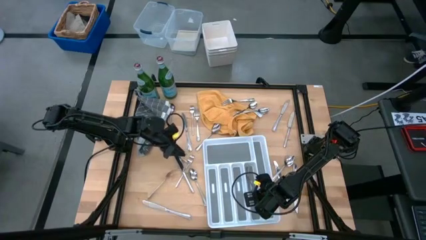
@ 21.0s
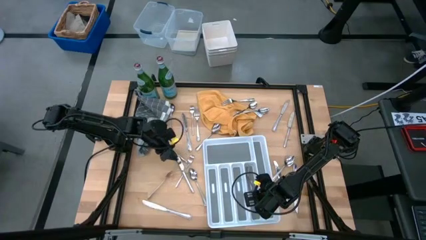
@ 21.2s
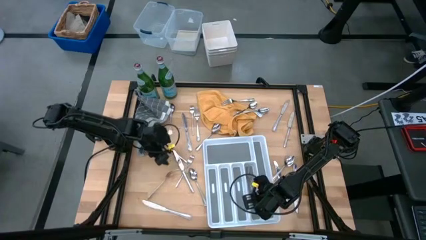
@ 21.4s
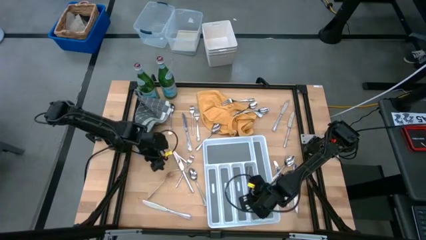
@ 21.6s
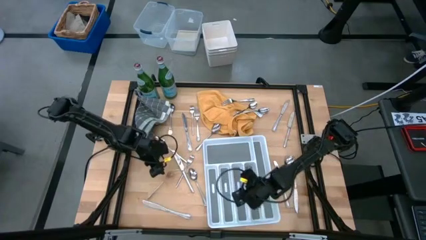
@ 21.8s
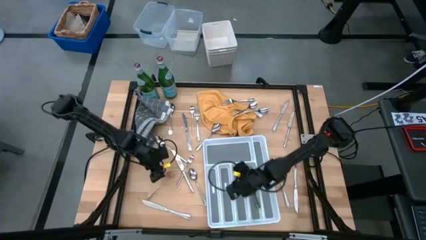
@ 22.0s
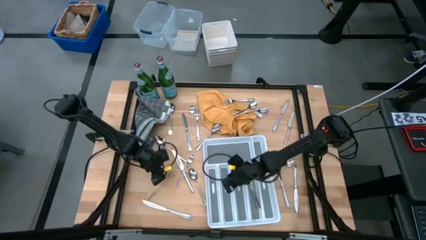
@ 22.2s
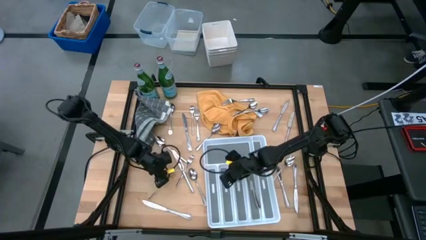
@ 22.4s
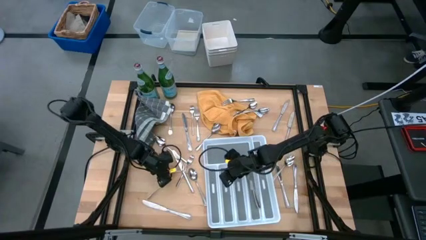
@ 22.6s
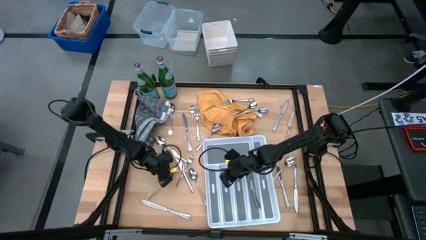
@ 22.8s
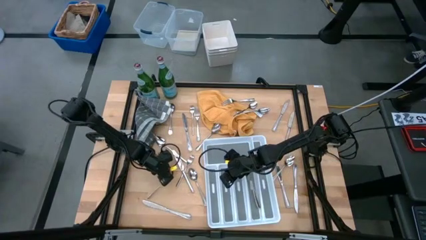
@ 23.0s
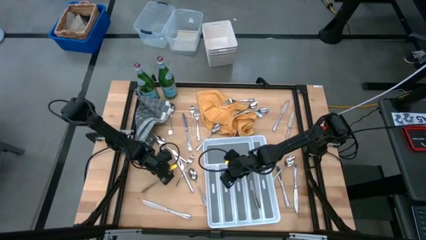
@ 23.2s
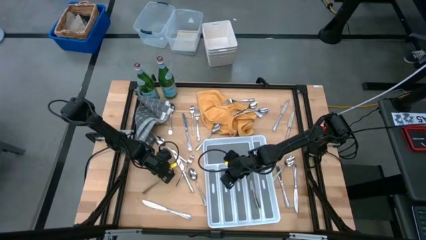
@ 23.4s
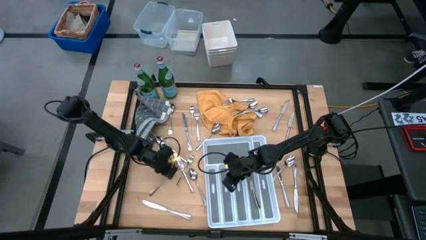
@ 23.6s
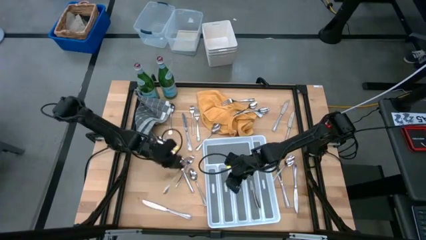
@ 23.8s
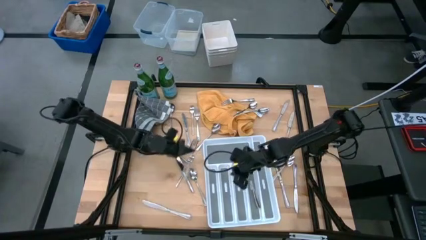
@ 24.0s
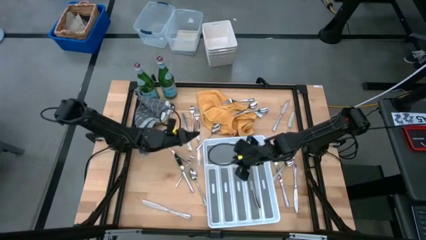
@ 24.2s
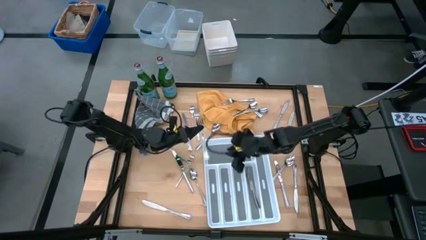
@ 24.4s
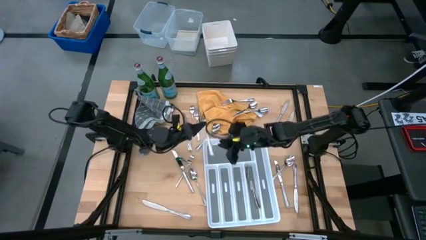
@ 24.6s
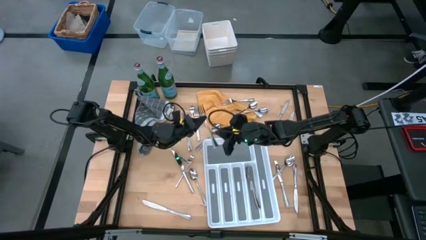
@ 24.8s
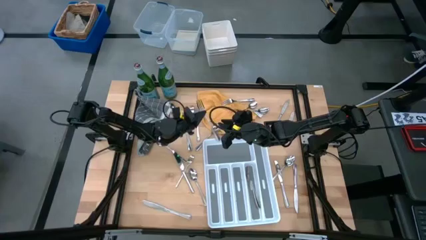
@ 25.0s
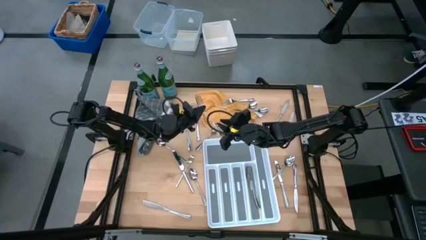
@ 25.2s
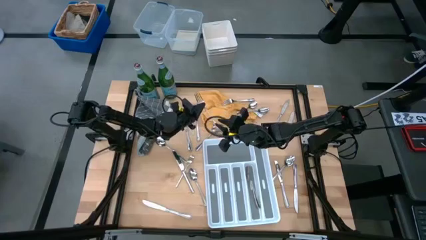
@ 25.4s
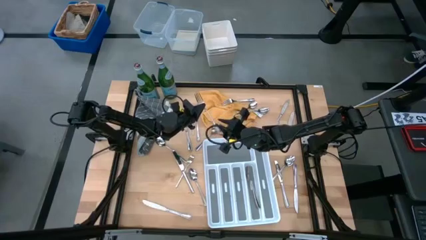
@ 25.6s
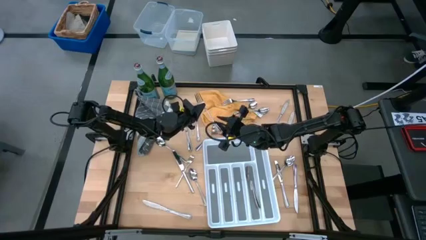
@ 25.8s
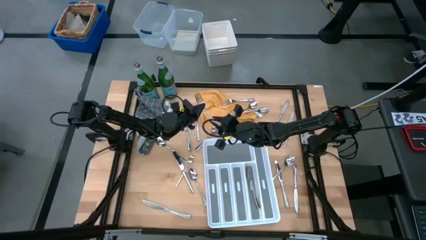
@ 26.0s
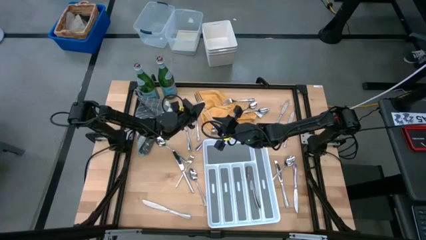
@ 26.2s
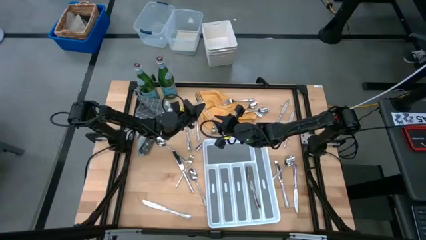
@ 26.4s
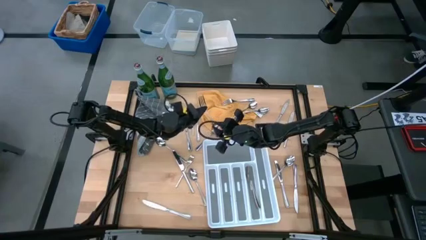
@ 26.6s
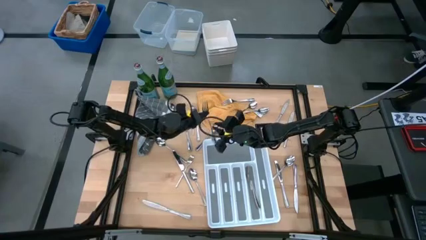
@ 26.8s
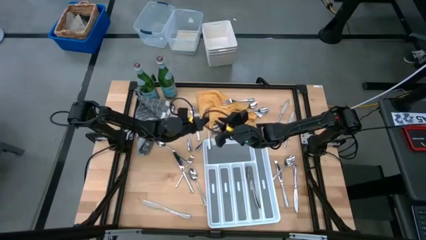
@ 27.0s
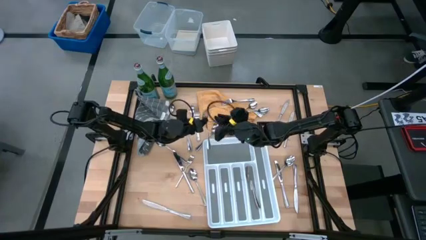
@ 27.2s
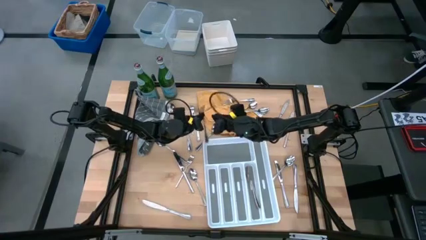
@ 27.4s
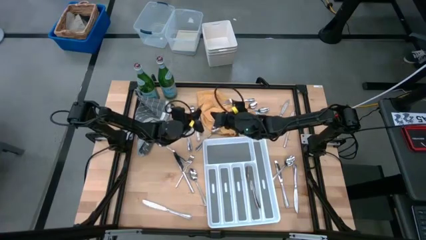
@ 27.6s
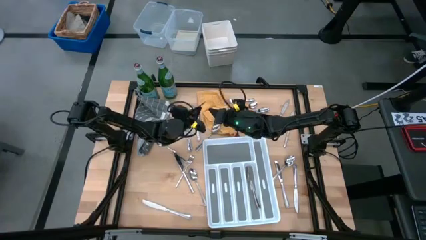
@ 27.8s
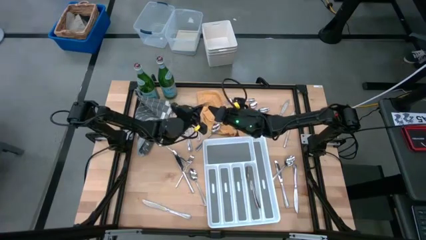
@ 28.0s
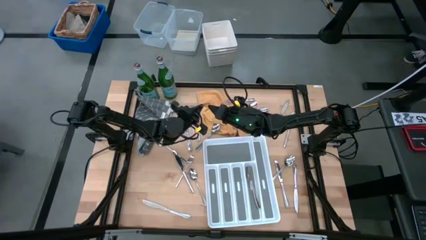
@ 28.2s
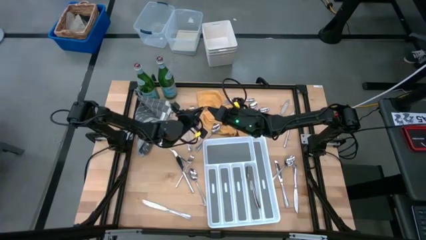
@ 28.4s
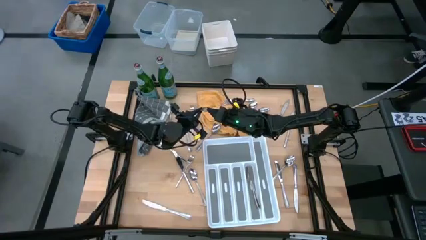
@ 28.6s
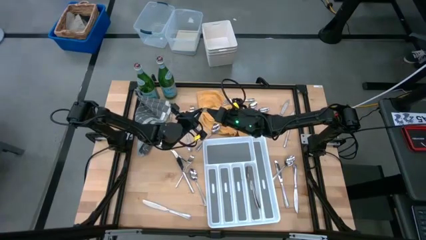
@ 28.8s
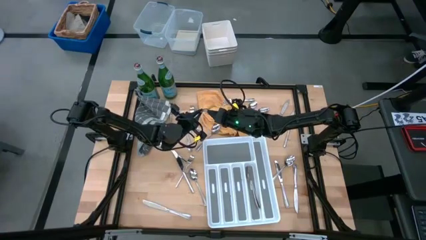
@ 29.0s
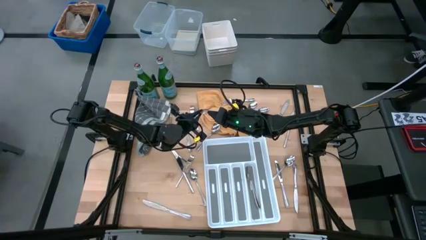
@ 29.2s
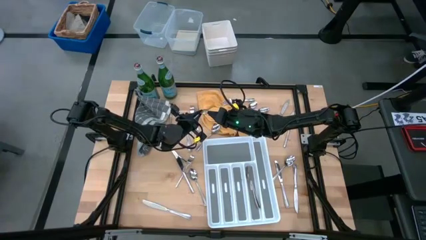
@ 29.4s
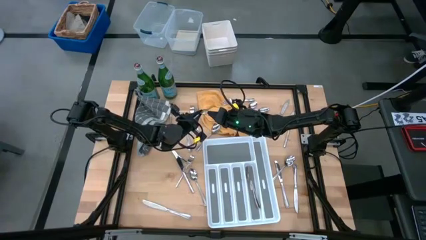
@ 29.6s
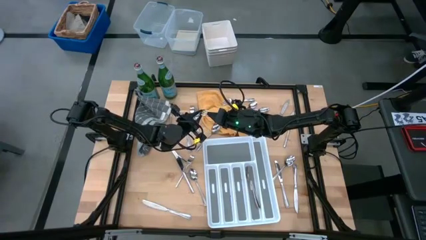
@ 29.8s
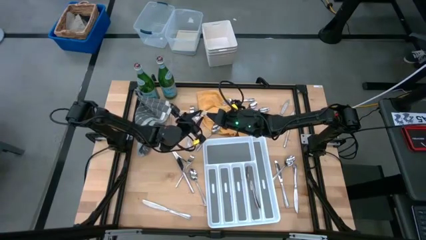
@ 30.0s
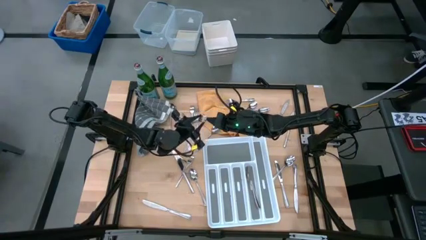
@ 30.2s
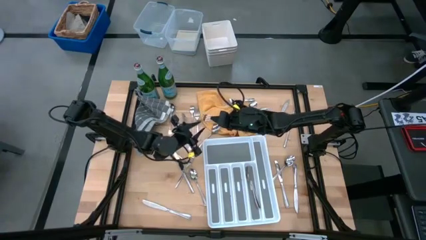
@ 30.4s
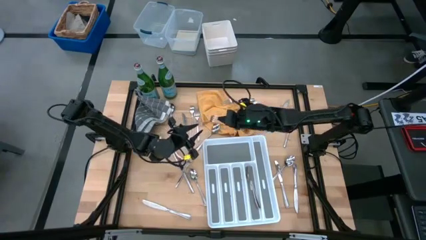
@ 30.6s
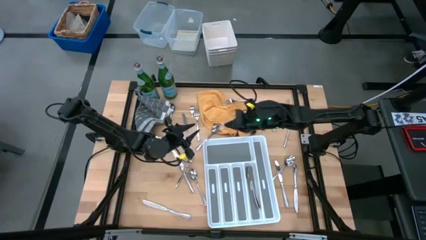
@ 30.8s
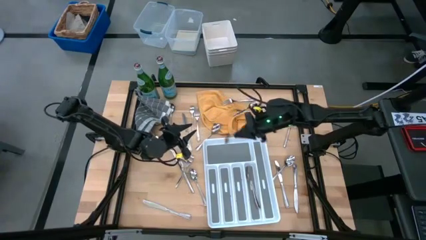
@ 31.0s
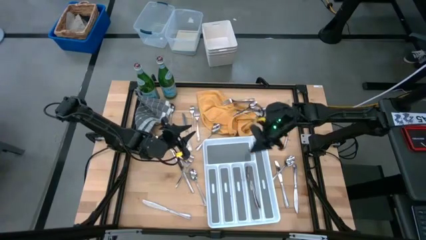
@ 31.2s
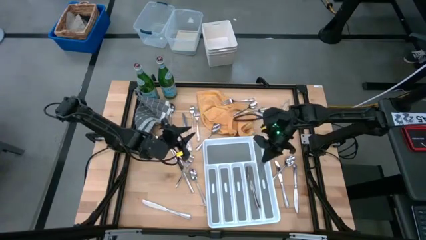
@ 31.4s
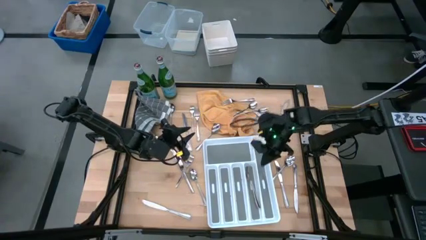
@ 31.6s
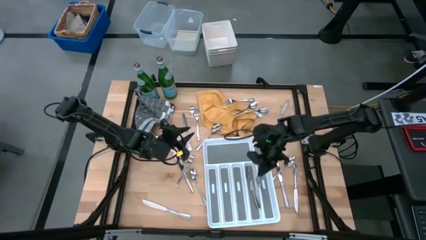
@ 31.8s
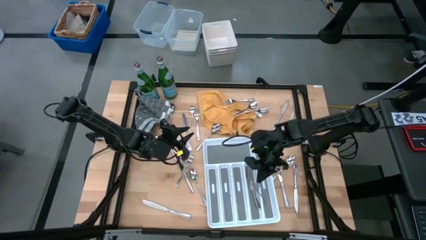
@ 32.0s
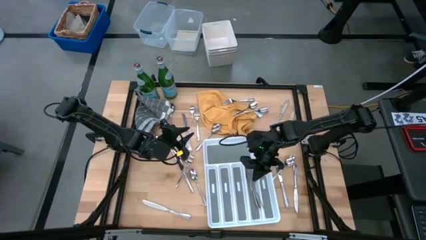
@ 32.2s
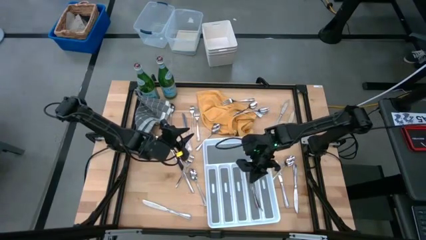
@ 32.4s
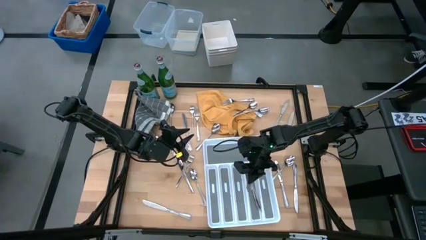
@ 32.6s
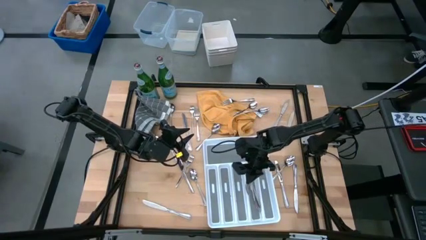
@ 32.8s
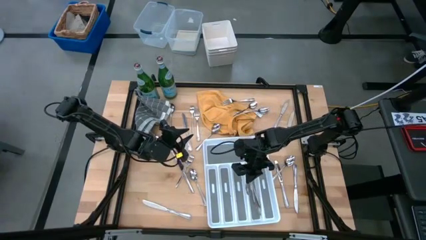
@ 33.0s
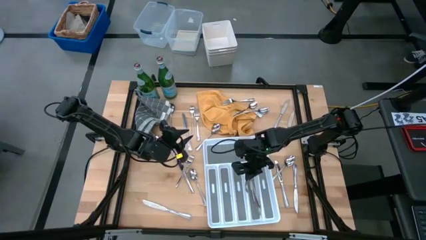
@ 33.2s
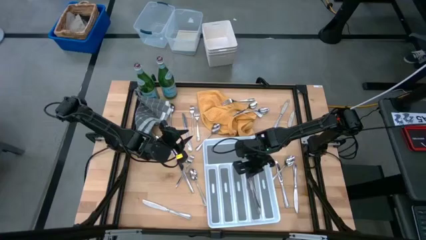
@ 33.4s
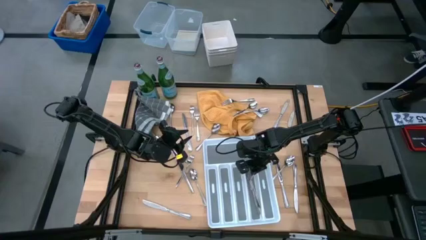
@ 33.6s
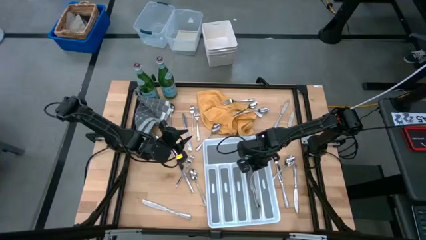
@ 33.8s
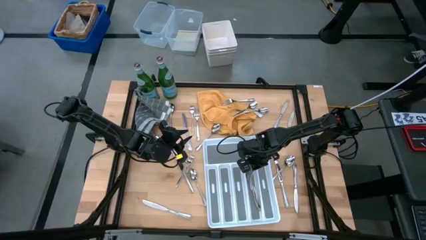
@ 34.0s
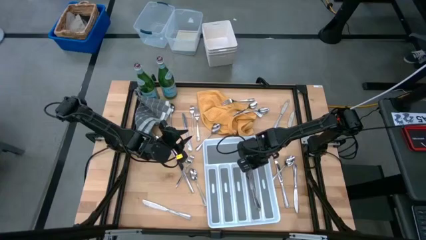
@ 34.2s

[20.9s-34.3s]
Task: Sort silverware
Put the fork into the silverware tray

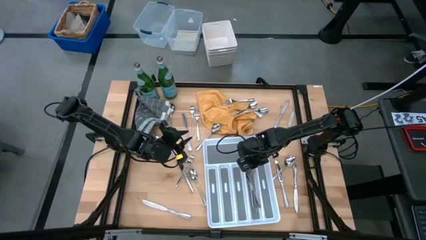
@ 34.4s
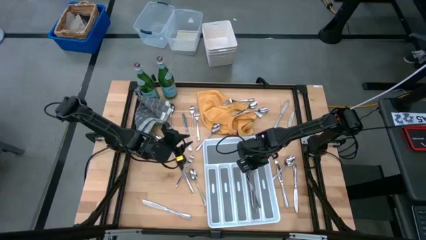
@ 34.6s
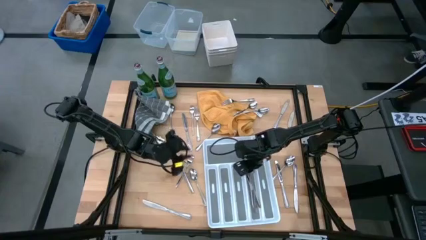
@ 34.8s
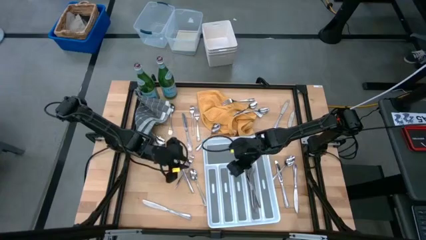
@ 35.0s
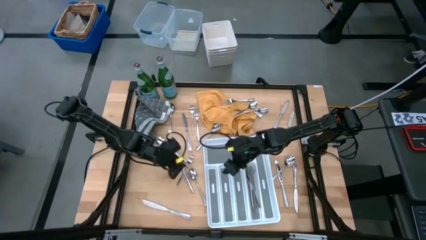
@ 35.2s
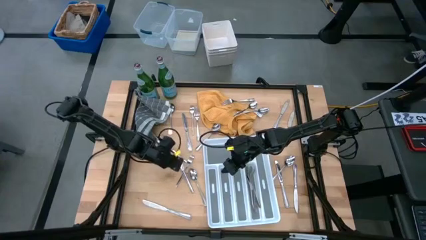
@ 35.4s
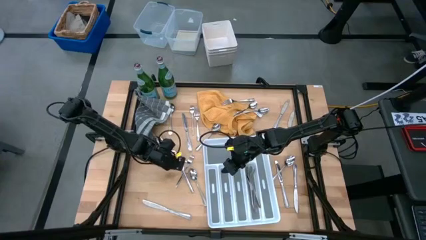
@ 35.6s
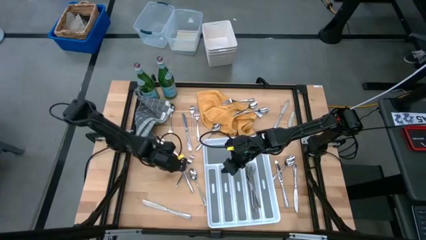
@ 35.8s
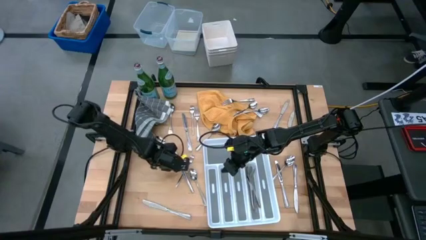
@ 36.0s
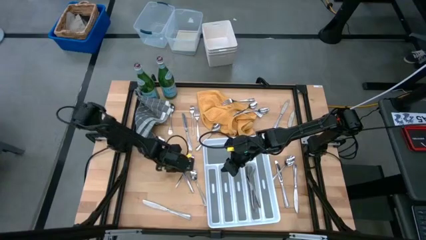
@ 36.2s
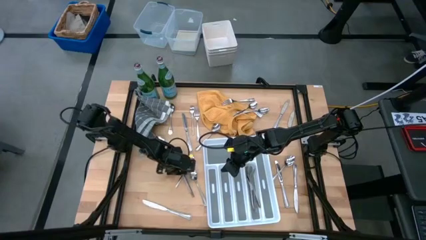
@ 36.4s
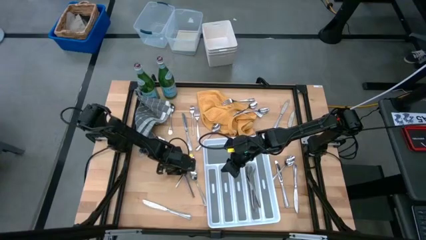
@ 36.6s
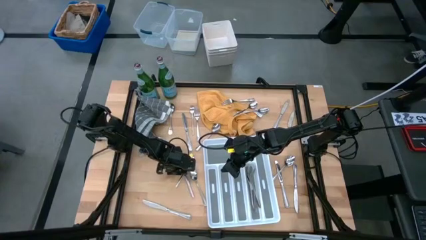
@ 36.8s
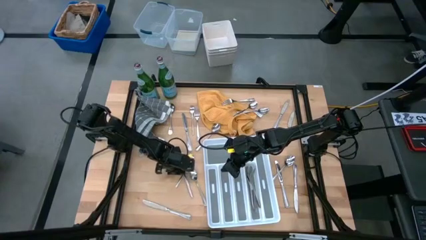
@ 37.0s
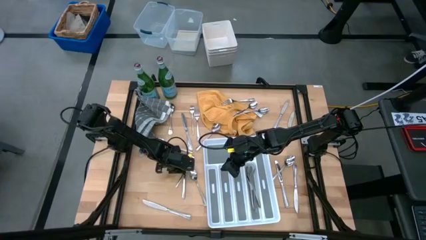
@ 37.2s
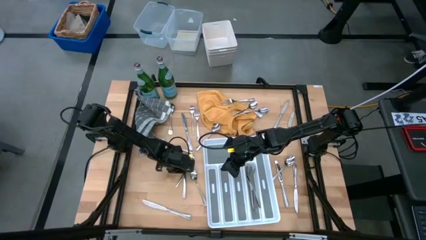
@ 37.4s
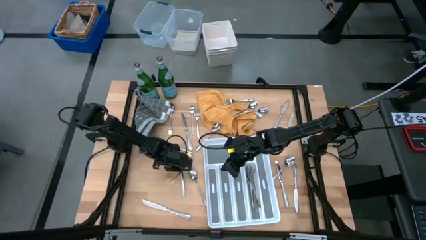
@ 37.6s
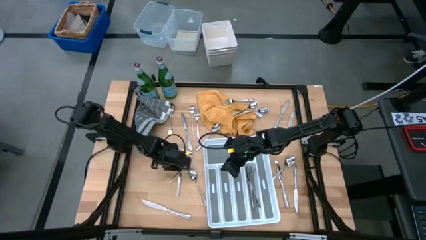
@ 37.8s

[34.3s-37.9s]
Put the table knife into the silverware tray
